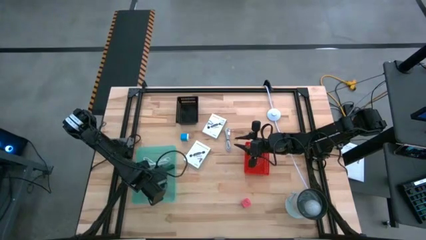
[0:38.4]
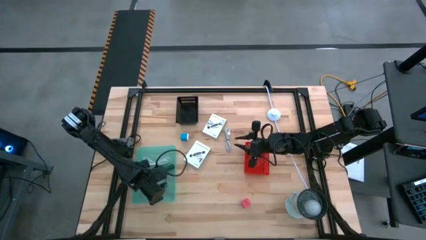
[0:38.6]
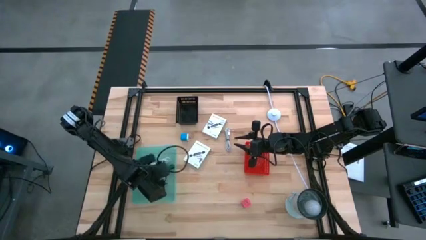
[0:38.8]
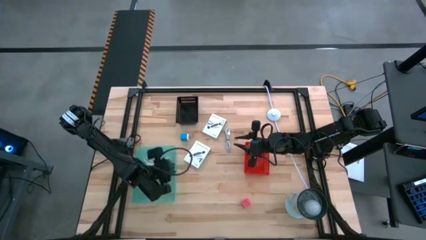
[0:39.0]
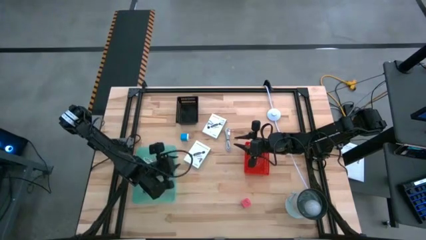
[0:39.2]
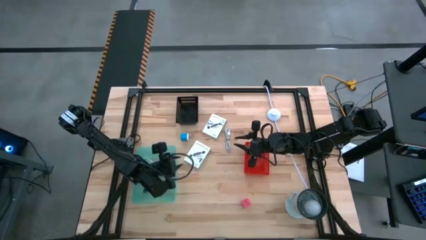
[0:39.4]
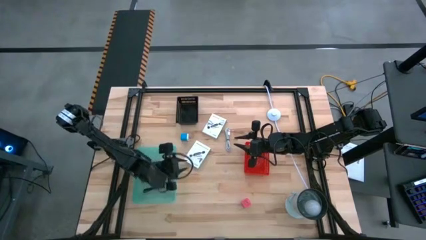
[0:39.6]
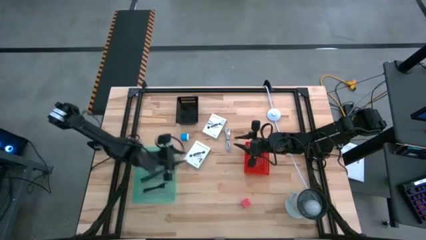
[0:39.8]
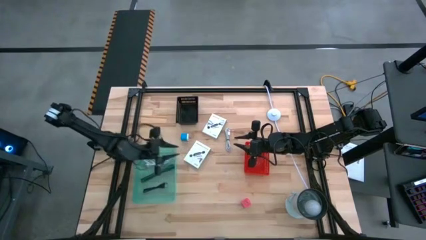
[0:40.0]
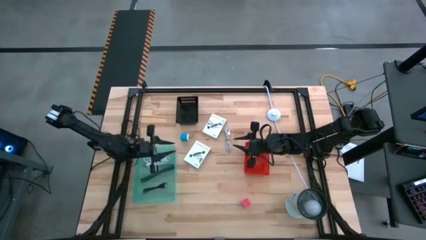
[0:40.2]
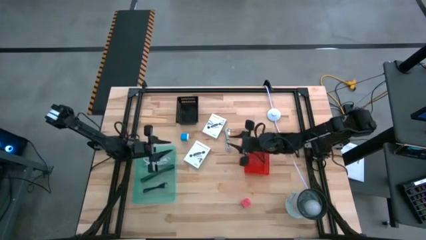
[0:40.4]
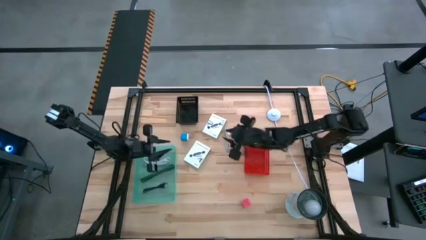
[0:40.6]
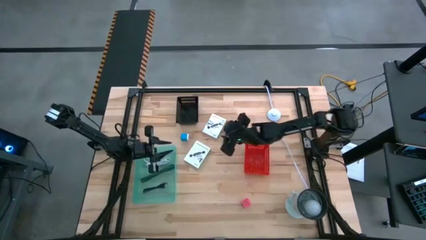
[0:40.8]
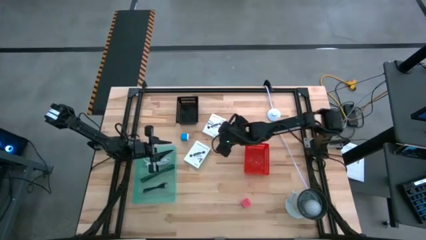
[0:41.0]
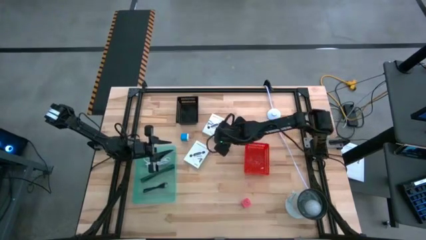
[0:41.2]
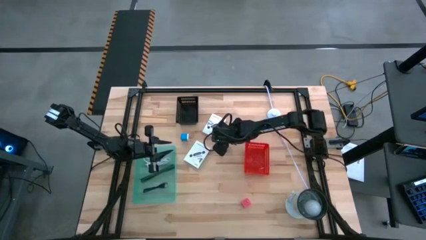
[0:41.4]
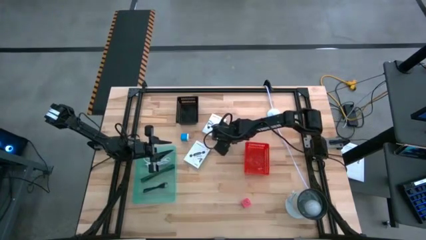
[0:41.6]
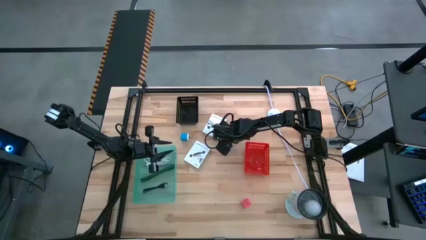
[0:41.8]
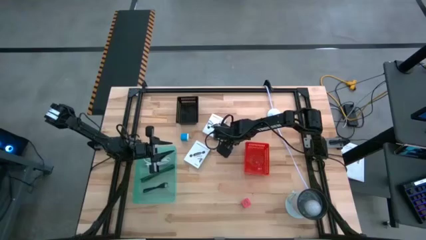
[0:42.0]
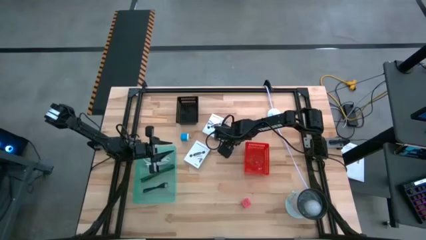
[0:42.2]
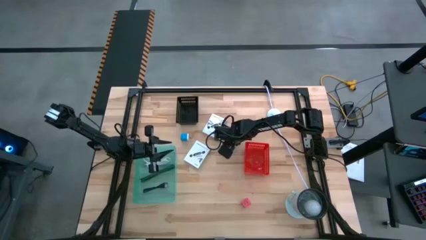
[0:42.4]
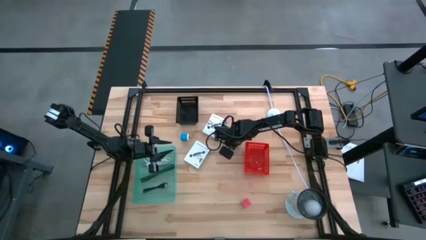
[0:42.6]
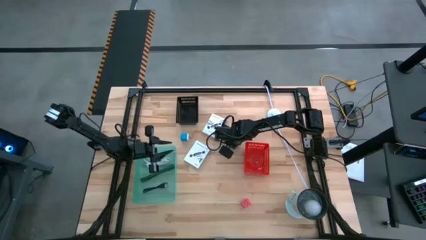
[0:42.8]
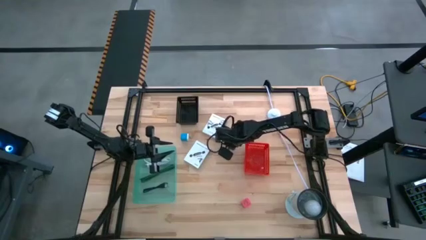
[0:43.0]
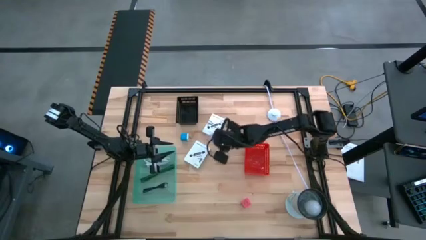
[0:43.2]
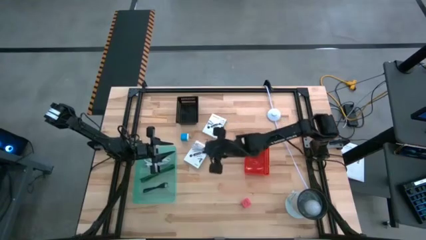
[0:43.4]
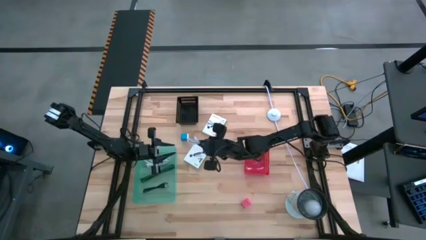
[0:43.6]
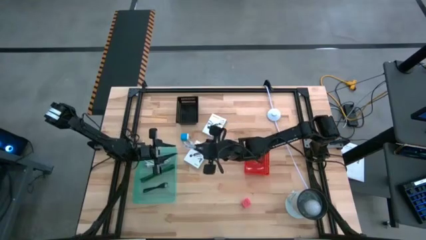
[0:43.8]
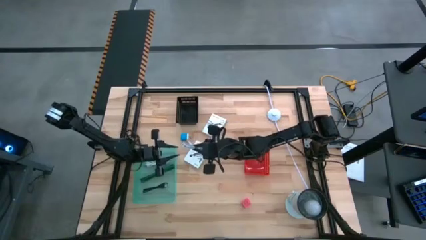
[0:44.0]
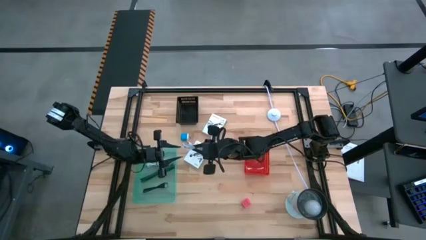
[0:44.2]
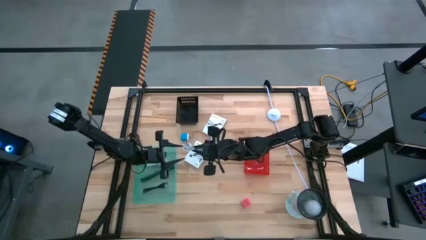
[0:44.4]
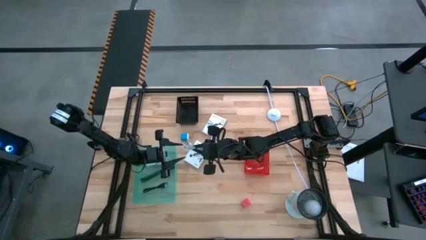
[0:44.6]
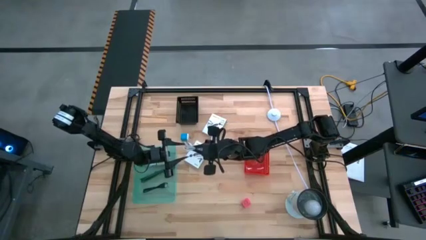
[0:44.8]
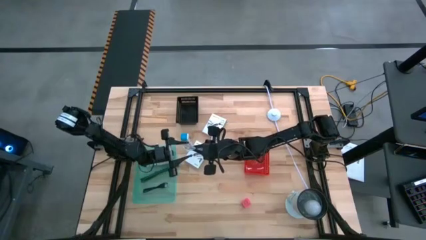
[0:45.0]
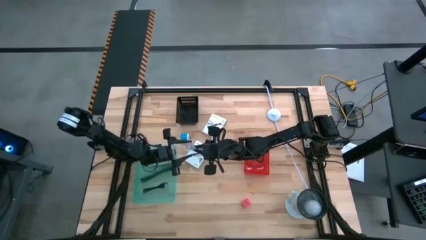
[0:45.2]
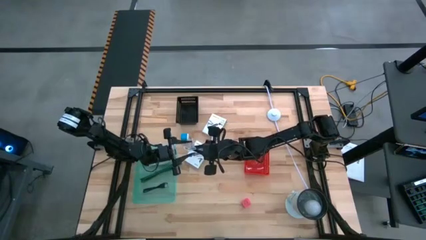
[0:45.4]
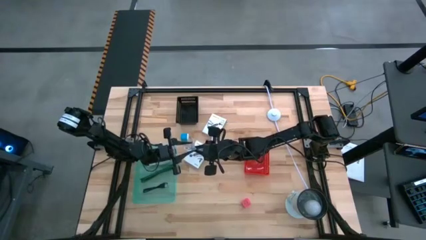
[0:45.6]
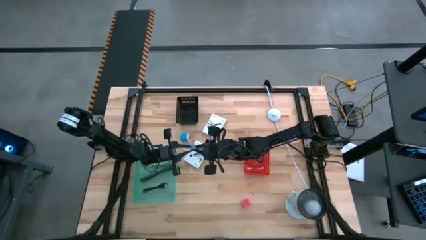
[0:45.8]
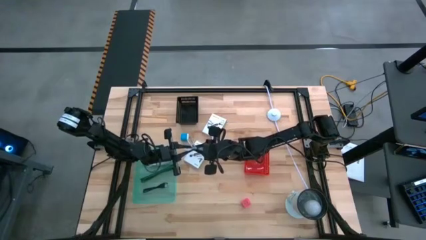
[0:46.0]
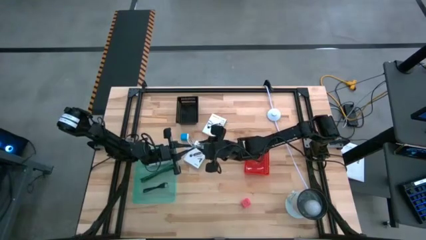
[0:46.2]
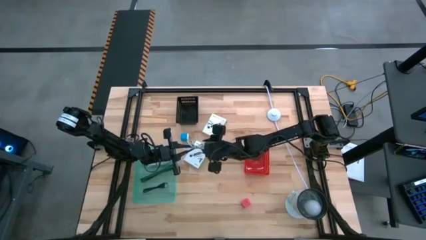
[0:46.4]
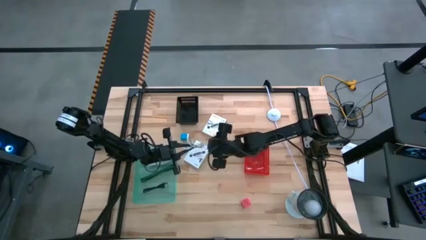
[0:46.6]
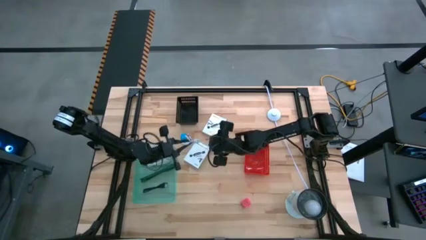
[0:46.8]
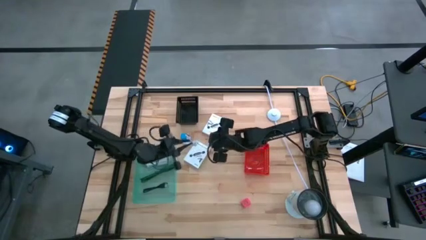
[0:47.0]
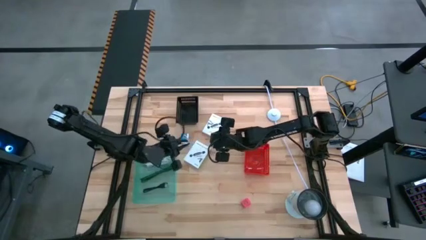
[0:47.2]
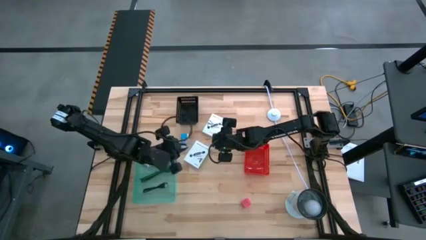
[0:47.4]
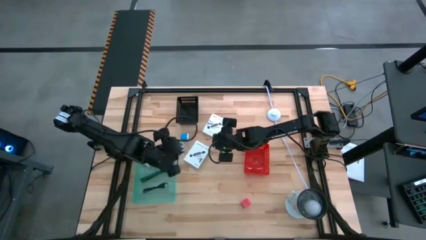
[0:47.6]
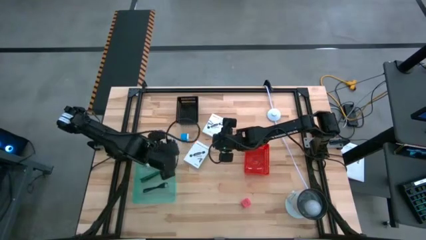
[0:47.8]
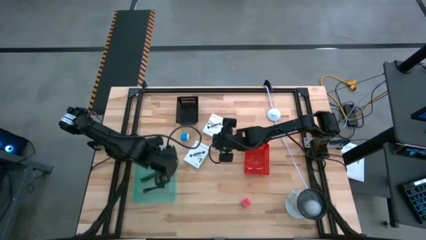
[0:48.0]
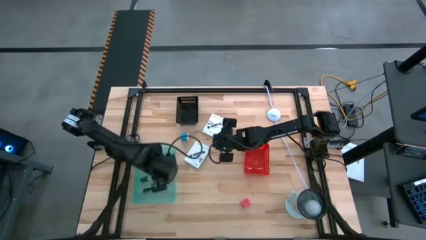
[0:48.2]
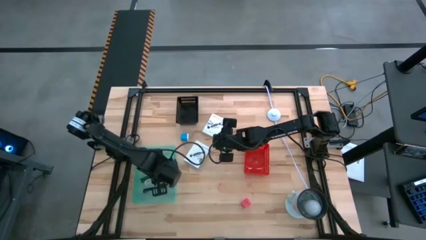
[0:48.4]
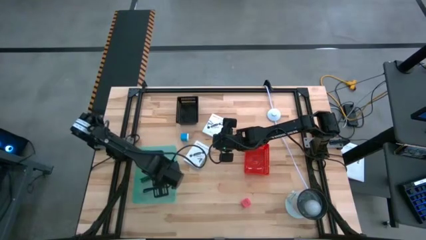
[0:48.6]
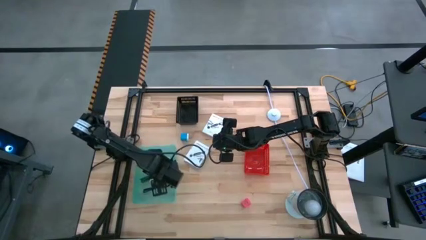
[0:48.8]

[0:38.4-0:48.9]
Task: Pick and place items into bin
Put the white USB cable into the light blue bin

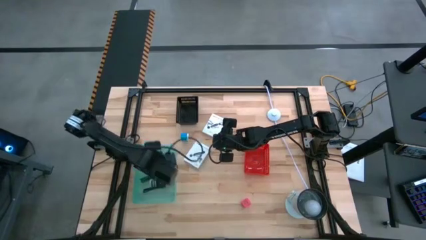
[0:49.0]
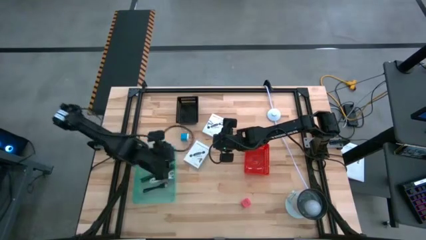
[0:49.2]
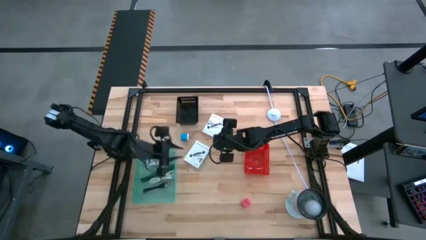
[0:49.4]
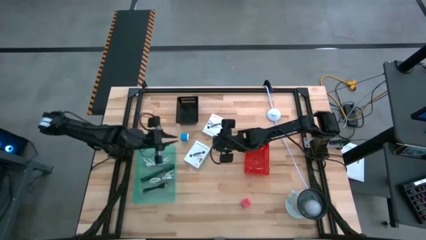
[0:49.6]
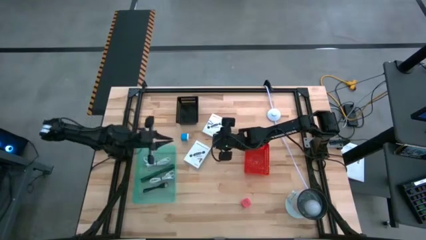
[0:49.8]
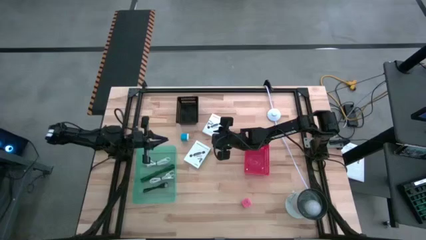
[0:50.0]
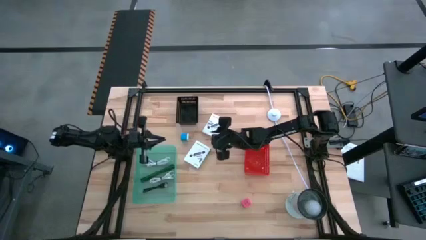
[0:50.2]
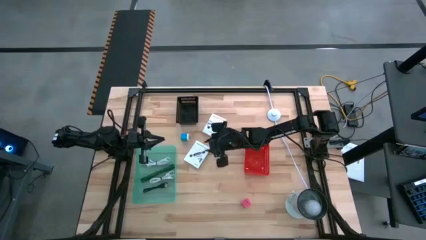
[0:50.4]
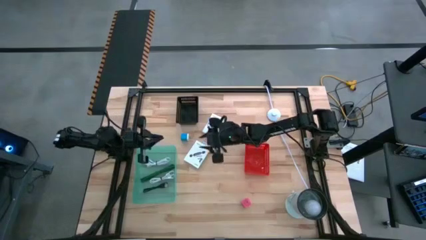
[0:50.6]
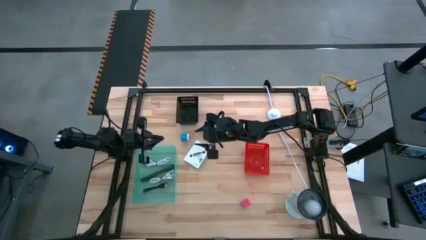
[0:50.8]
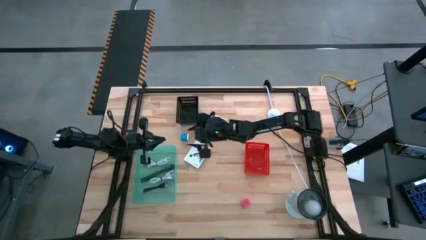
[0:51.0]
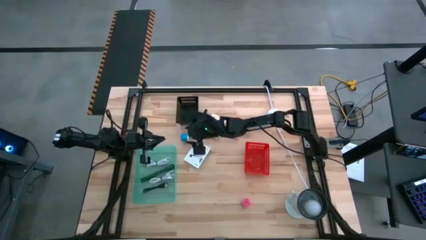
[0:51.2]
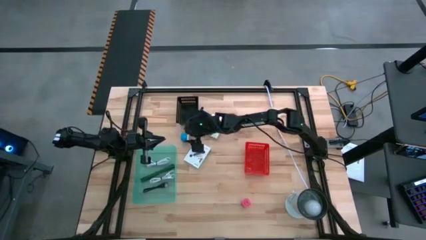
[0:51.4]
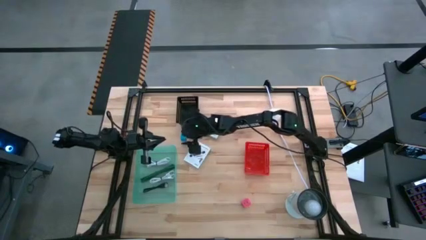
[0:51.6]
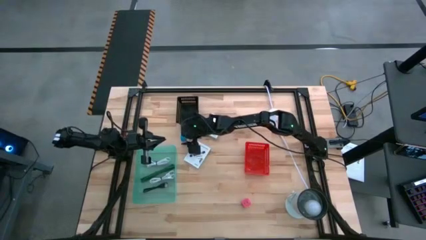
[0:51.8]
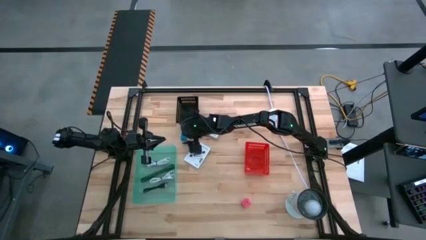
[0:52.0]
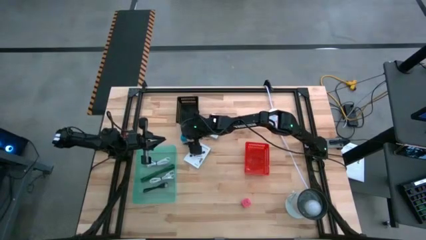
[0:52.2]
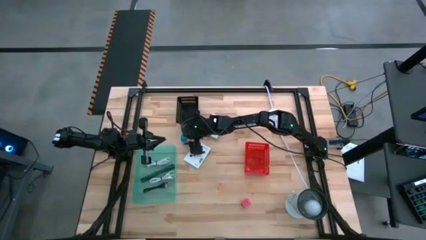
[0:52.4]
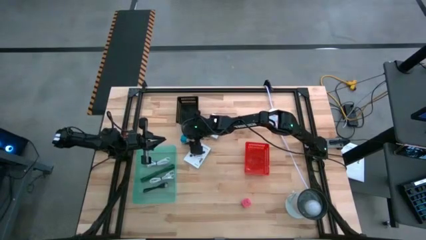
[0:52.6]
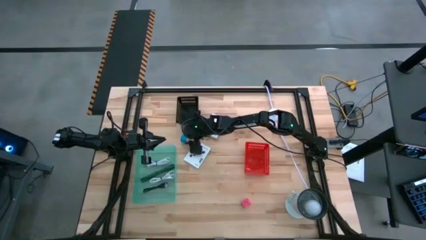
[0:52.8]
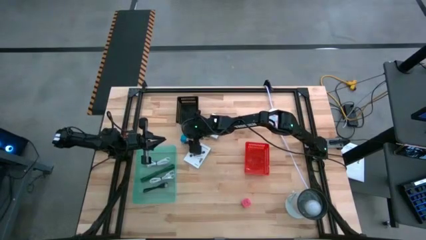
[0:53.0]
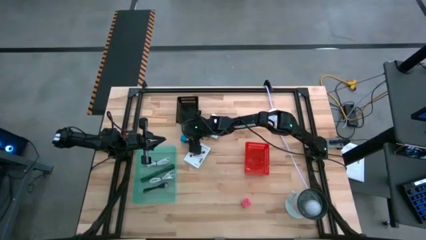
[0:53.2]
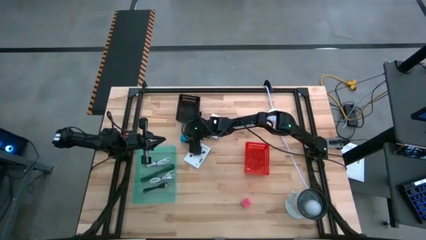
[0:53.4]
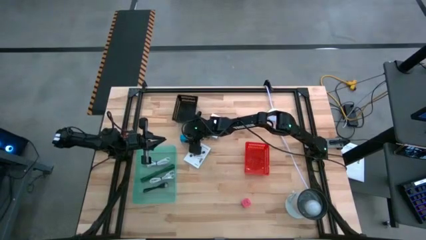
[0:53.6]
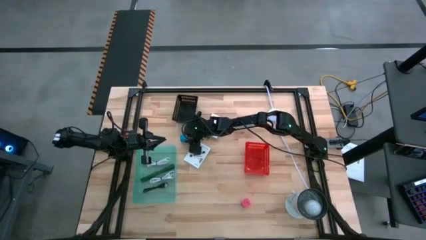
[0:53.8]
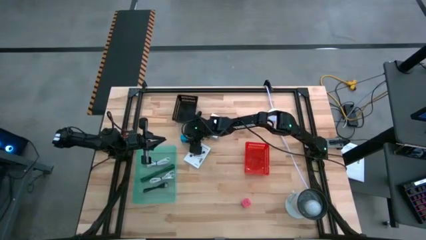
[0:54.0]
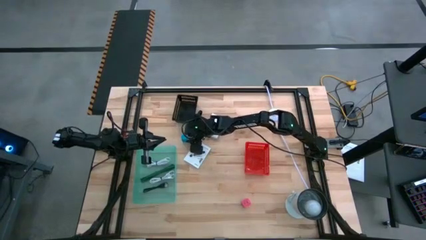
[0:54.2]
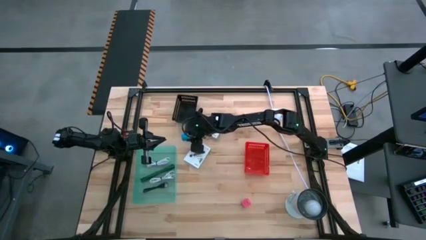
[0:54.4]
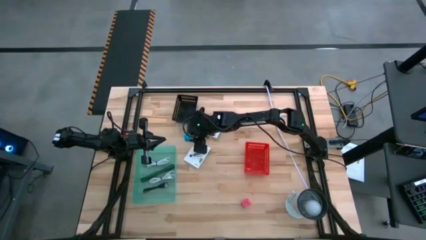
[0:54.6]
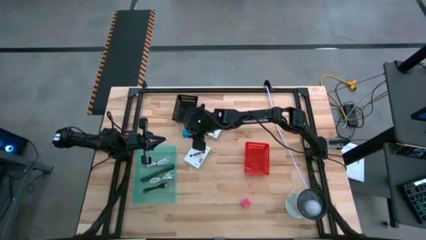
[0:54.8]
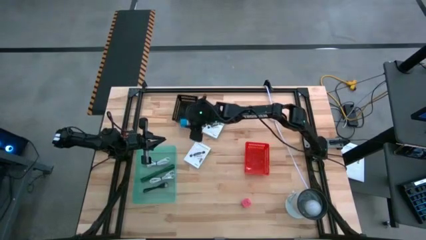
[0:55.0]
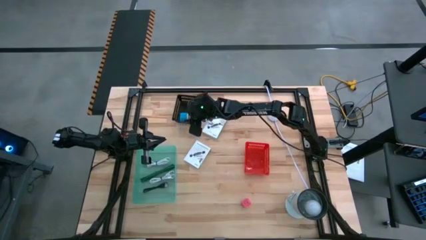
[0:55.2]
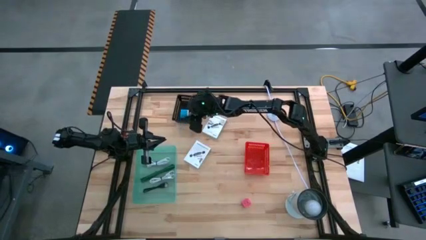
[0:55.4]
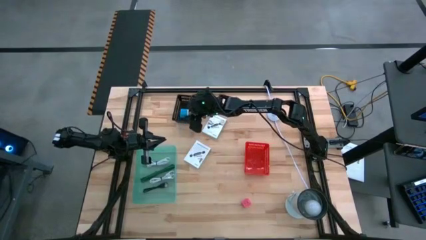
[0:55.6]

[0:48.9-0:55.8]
Put the blue adapter into the black bin
